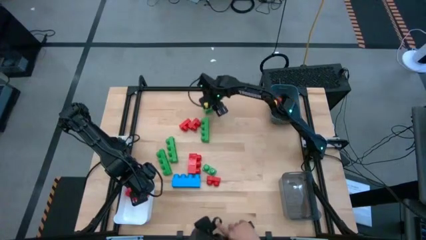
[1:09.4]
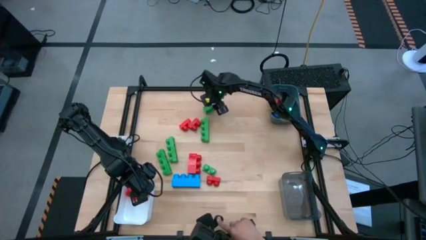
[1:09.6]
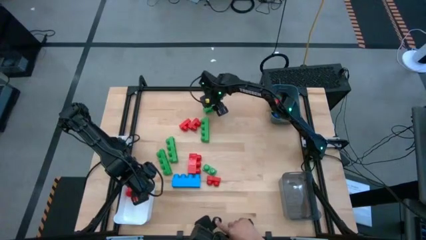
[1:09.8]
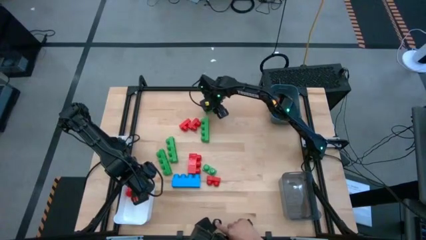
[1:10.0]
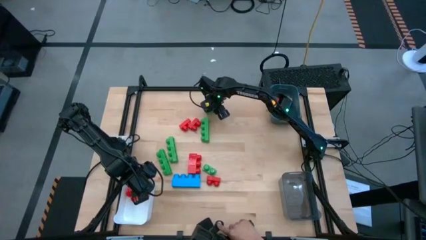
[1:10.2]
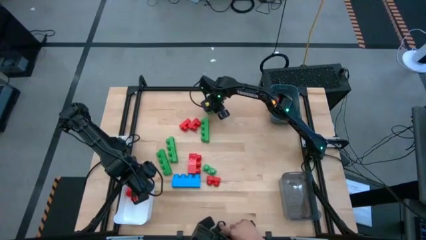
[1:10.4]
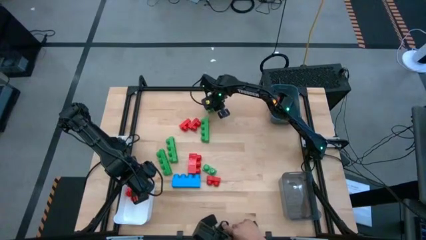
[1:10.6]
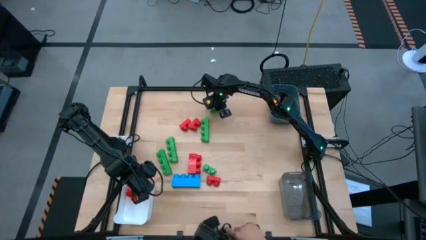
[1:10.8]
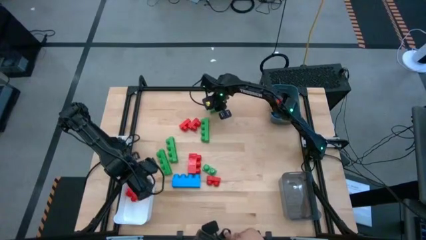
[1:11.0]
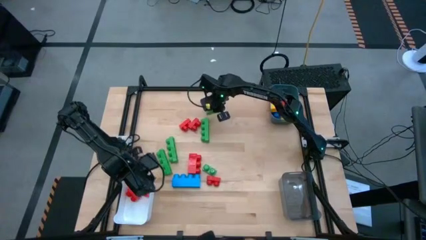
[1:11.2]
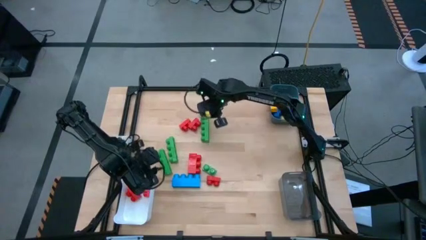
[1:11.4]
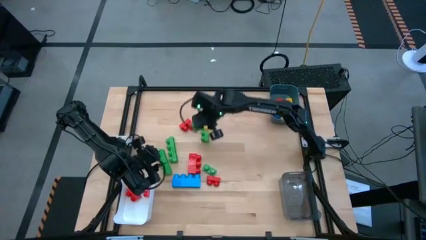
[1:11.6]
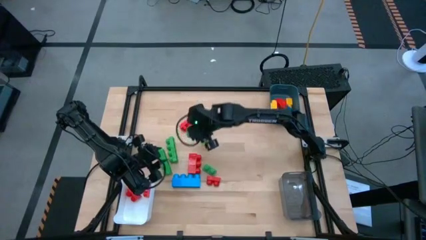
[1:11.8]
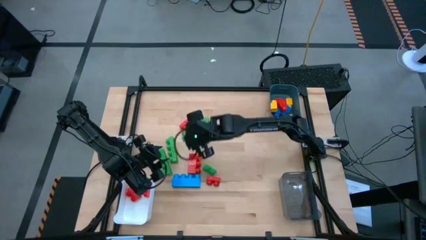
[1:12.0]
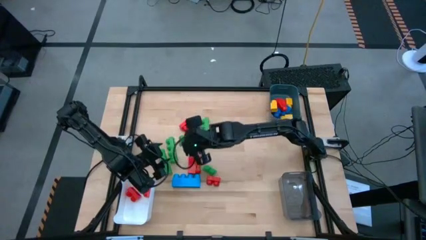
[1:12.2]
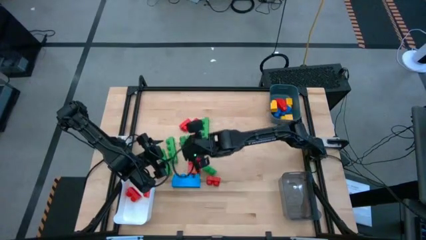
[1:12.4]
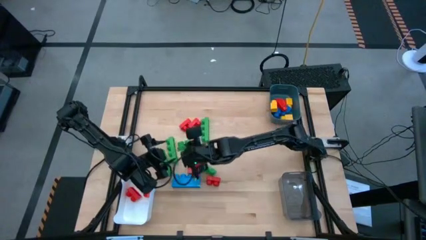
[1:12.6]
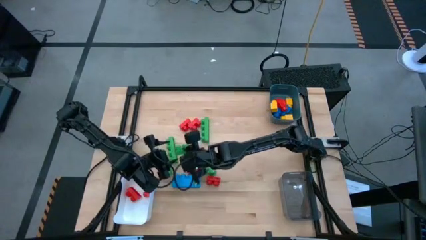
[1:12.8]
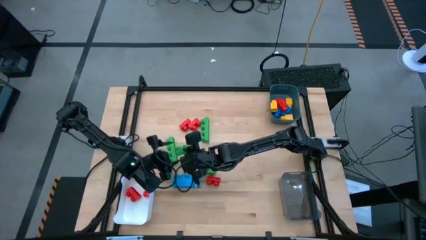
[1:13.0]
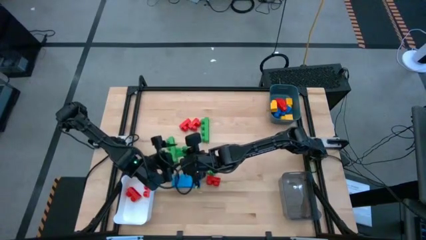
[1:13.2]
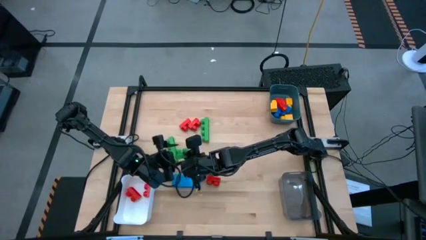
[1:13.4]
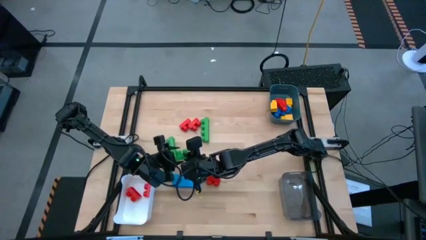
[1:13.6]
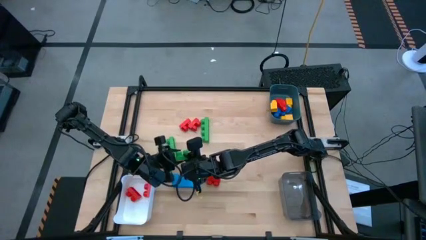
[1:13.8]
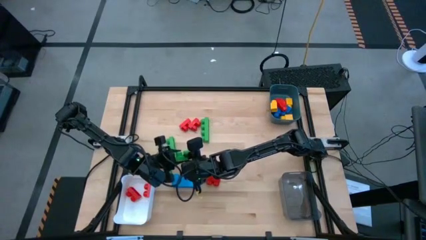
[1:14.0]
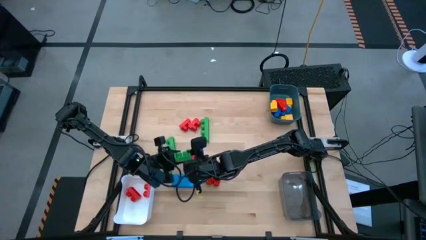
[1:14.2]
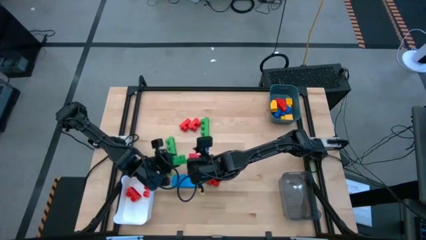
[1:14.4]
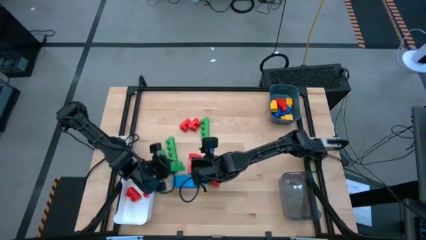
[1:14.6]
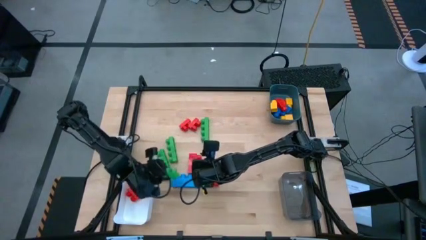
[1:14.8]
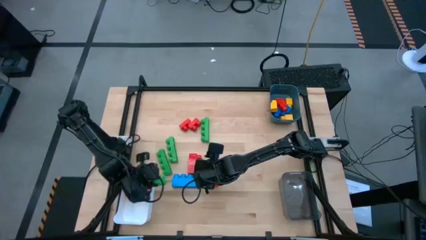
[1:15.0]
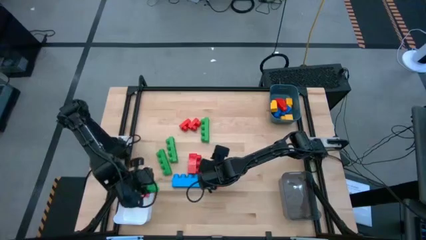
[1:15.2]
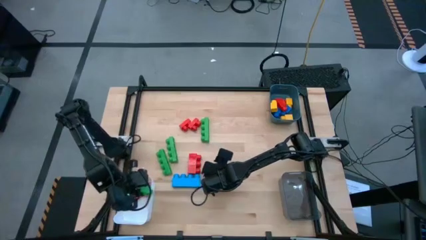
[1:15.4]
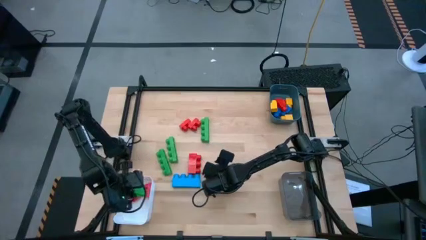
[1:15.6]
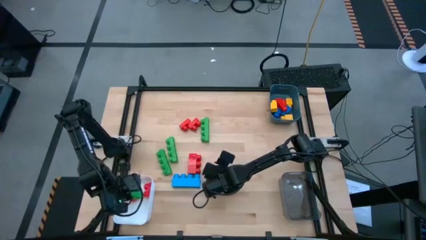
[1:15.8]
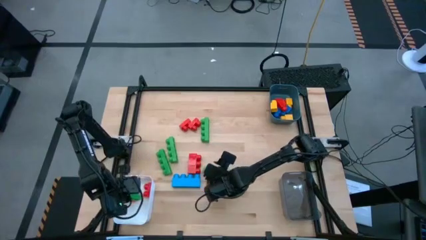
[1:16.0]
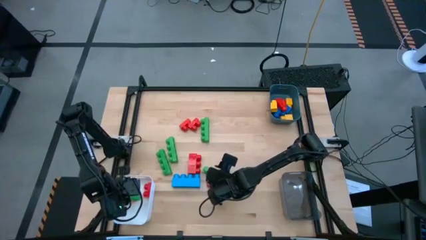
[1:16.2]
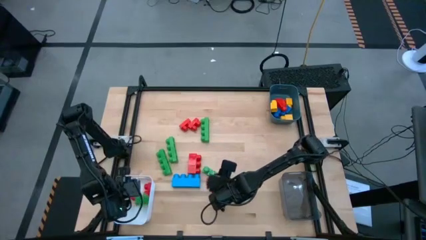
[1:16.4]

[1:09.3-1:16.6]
Task: Sort blocks by size
Put the two stud green piece into the white bin

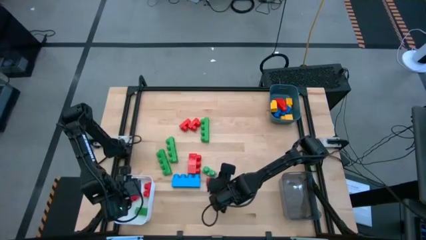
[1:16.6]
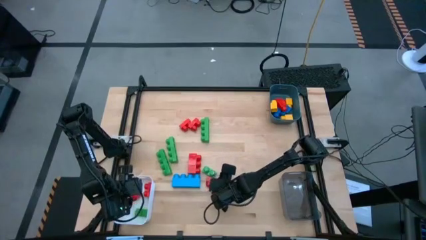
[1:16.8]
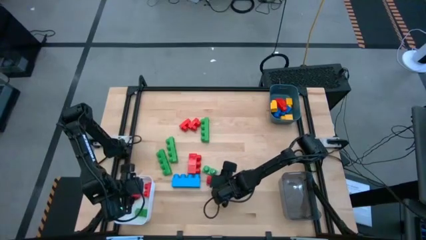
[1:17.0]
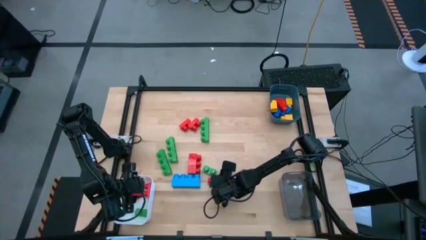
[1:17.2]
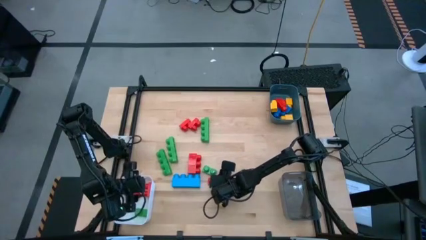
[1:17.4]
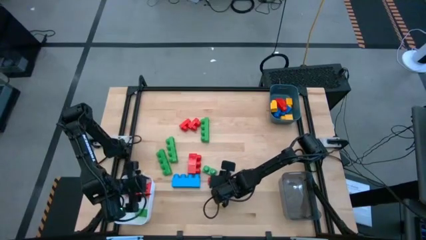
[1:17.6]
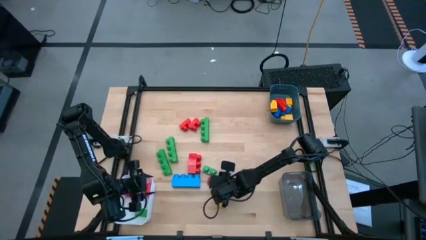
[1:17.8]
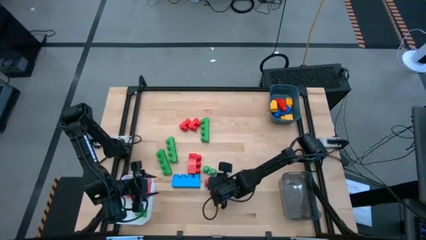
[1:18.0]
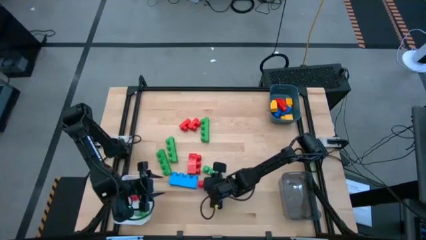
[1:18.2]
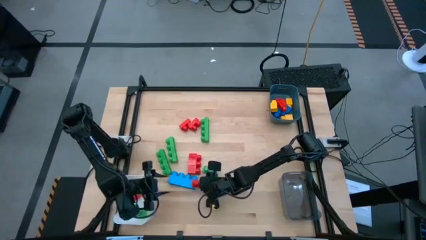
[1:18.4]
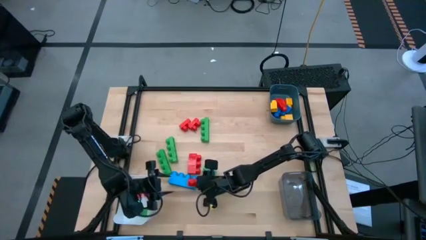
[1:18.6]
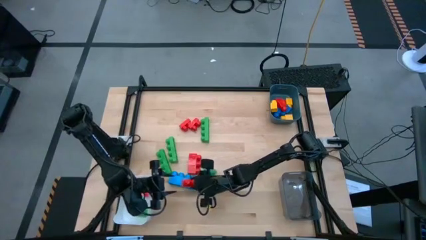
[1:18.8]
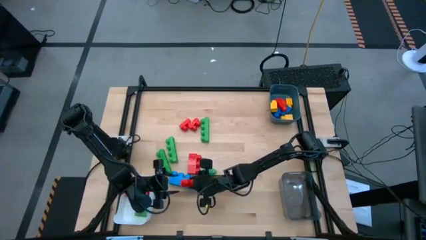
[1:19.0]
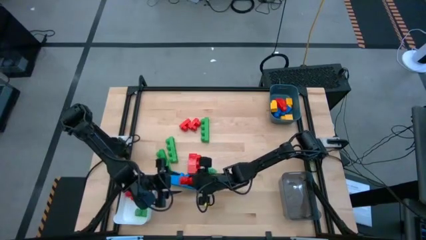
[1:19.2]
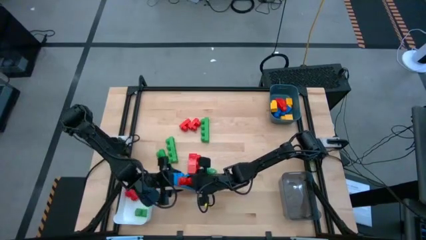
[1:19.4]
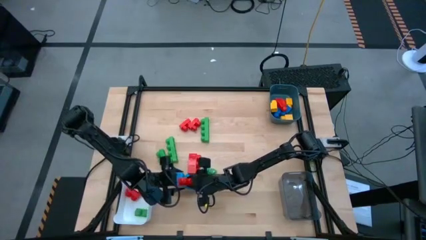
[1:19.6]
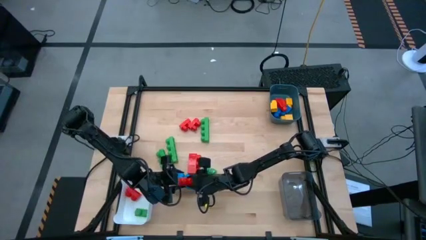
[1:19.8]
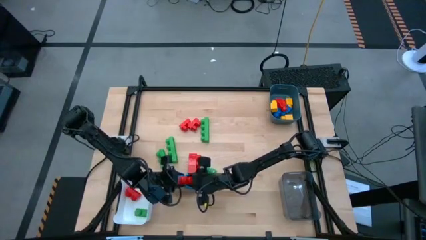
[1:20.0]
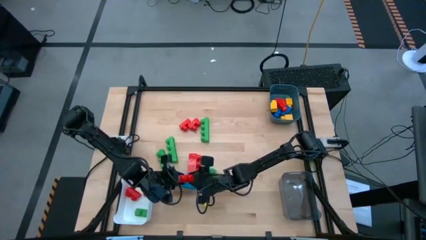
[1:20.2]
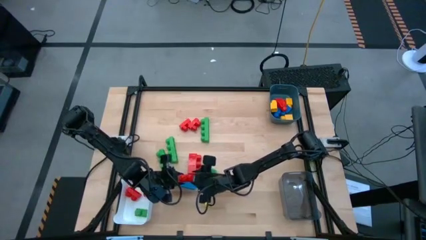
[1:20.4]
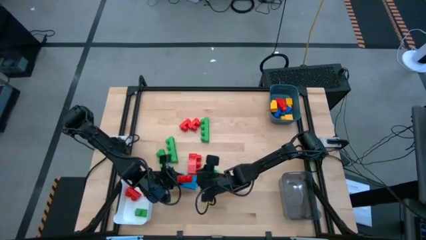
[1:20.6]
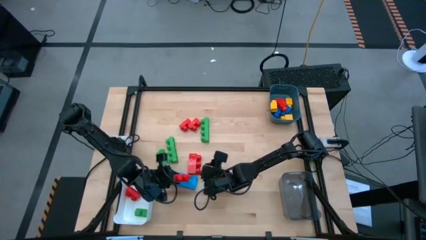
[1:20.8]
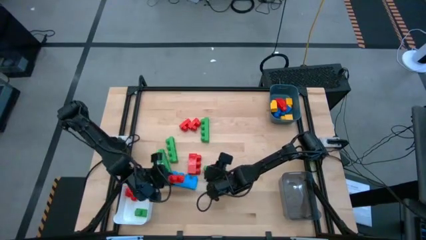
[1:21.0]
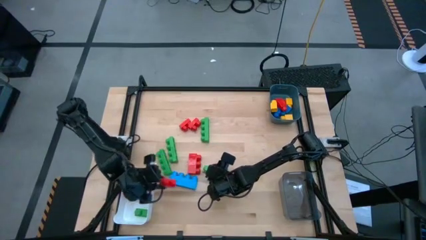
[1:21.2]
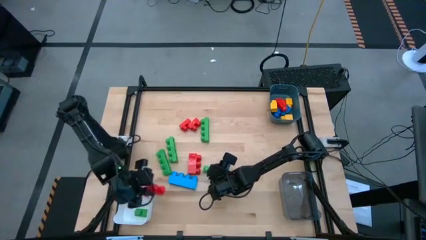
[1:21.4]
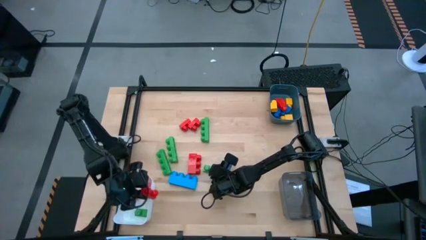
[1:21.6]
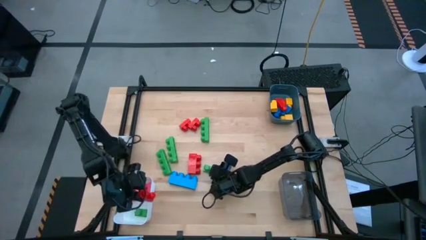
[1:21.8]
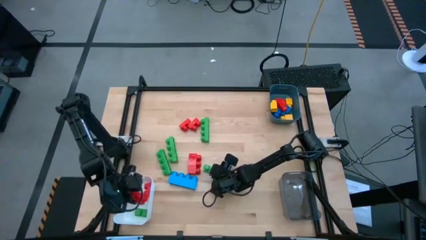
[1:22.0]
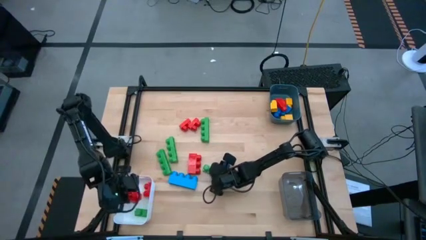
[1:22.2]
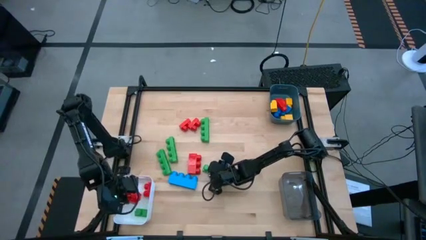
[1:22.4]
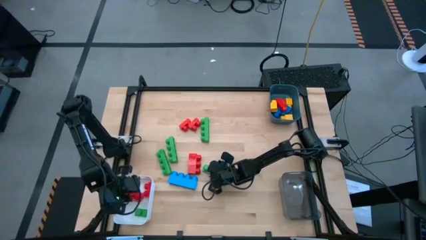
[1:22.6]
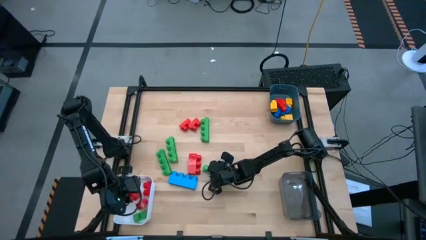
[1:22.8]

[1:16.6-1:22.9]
Put the two stud red game piece into the white bin

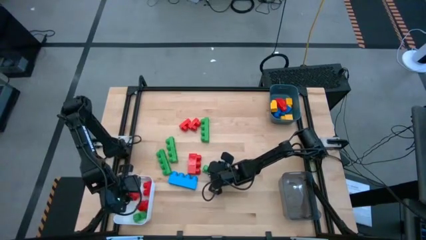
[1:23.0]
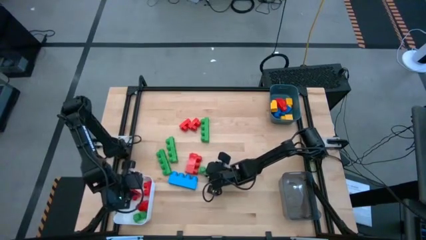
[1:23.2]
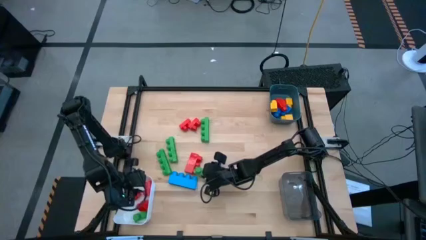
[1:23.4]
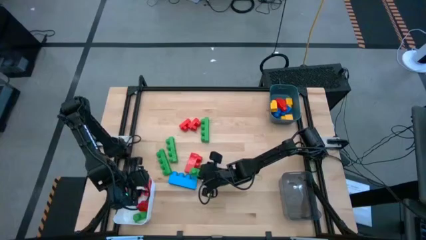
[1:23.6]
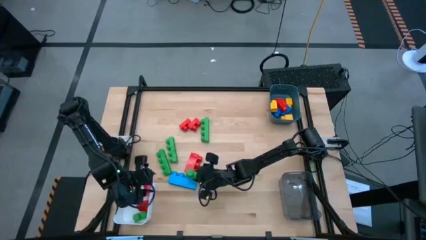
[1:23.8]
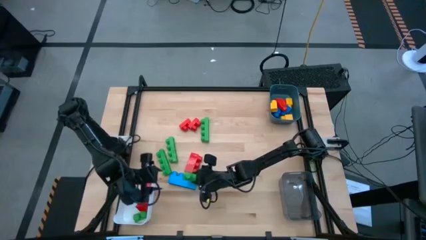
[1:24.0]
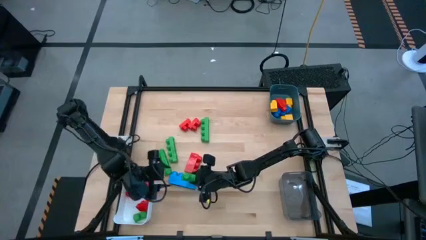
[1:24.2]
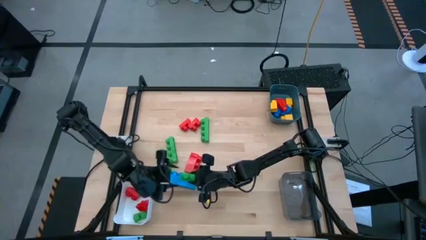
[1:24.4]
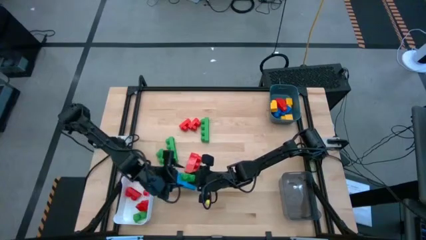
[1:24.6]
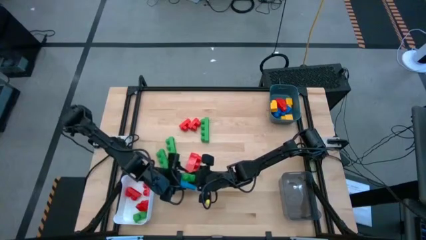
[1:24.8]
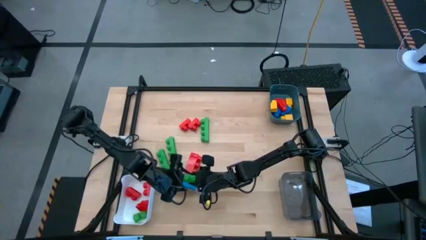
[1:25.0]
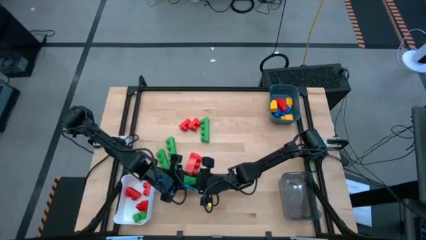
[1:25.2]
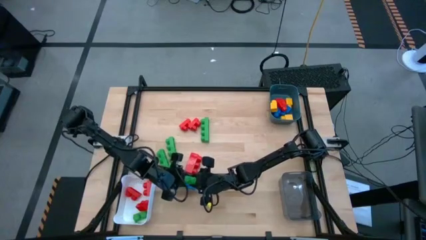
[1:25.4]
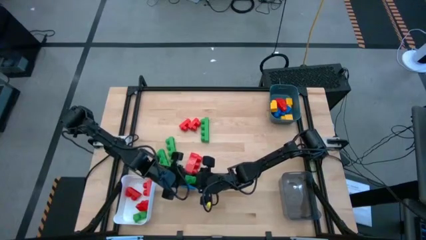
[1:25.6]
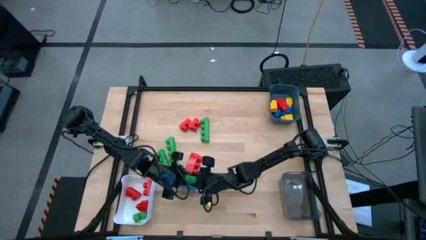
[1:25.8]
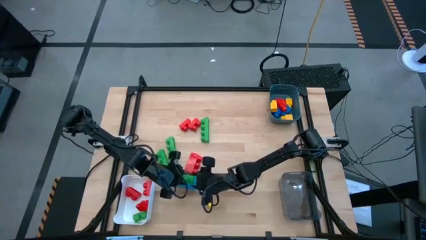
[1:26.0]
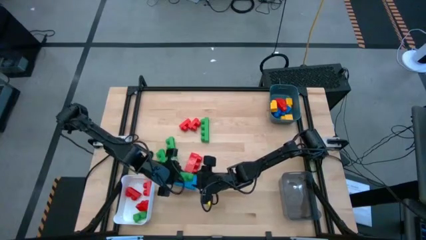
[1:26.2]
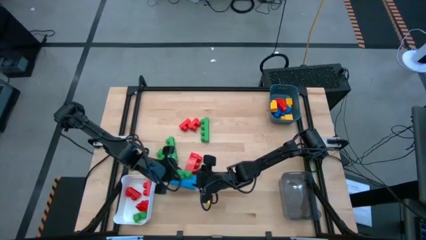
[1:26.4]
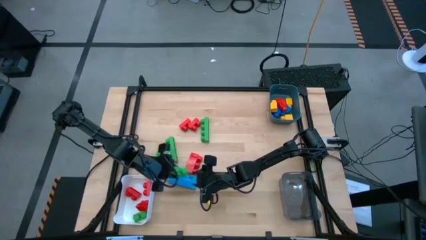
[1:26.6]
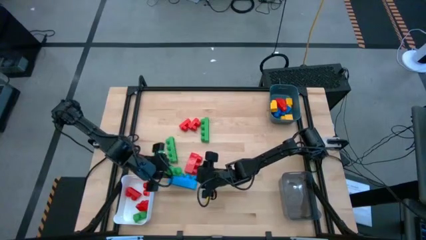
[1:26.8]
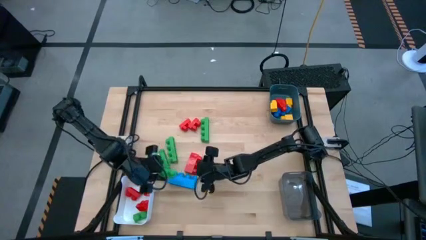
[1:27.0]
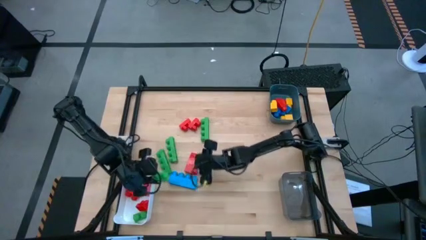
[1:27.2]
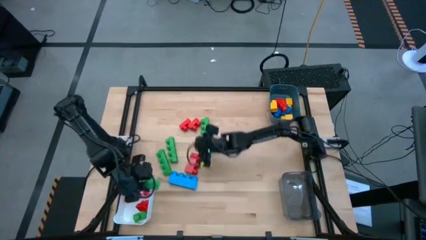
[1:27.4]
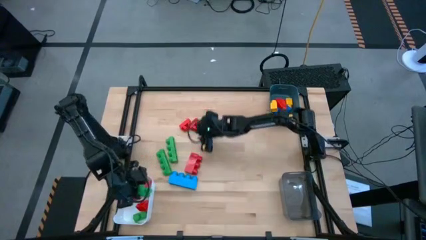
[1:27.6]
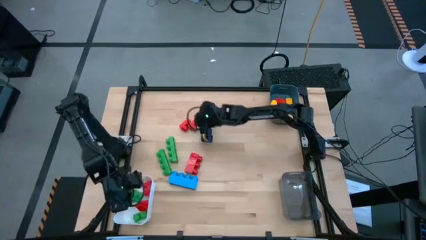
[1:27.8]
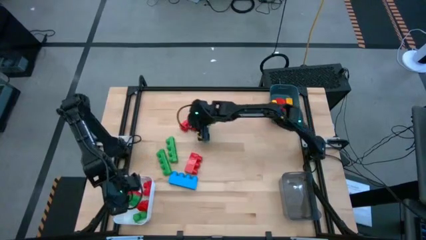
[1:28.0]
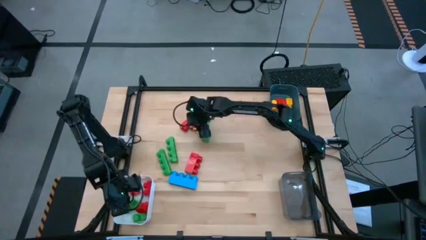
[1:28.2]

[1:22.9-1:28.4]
Put the two stud green game piece into the white bin
